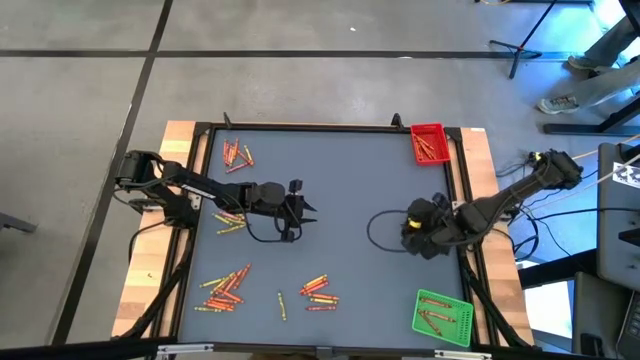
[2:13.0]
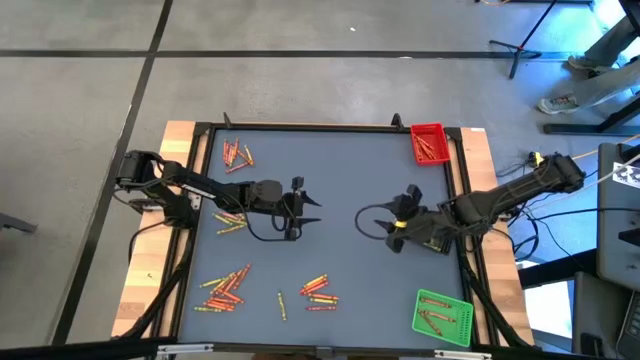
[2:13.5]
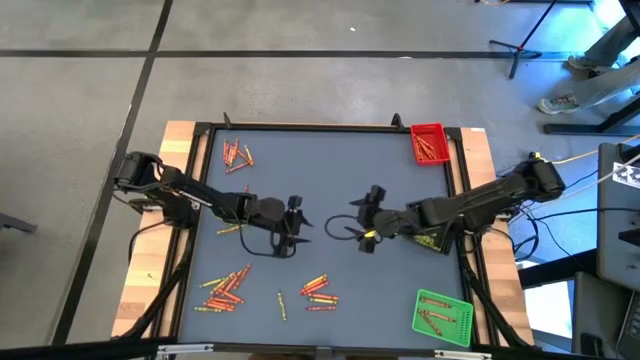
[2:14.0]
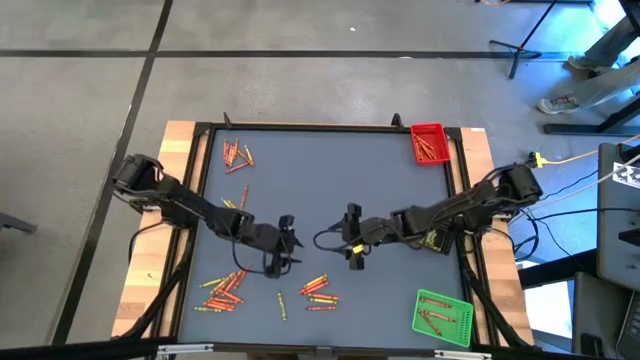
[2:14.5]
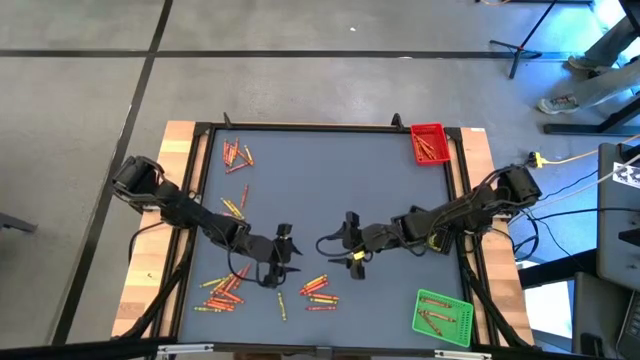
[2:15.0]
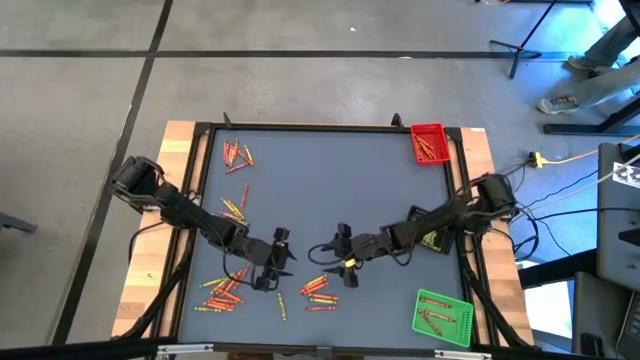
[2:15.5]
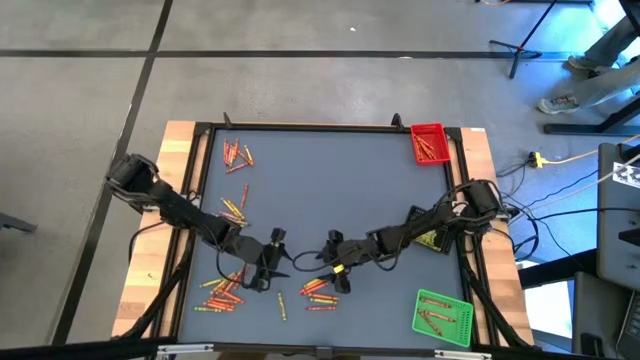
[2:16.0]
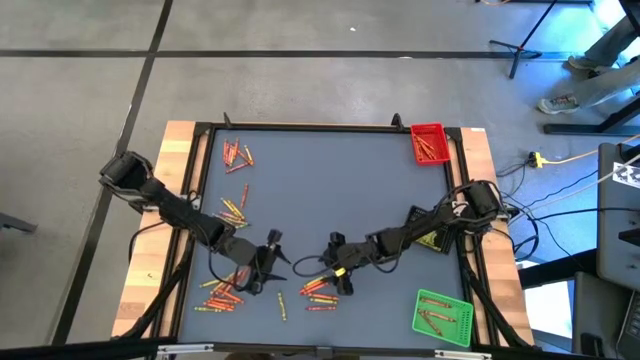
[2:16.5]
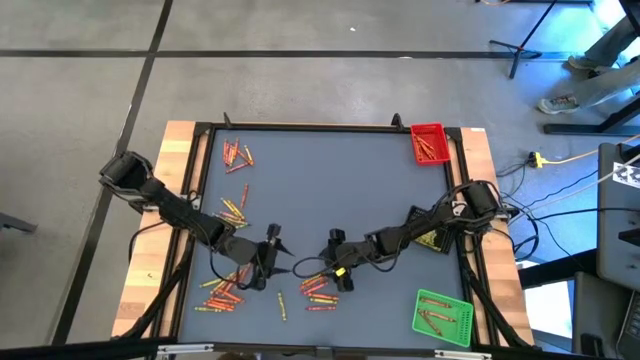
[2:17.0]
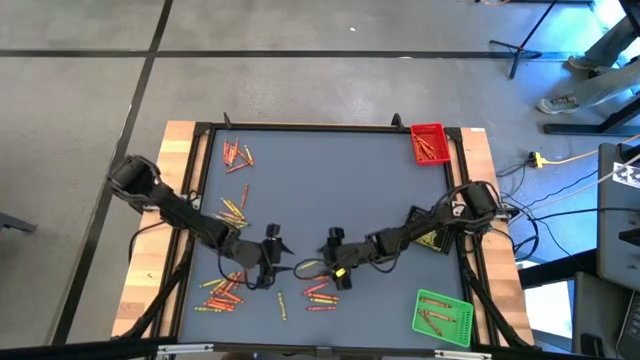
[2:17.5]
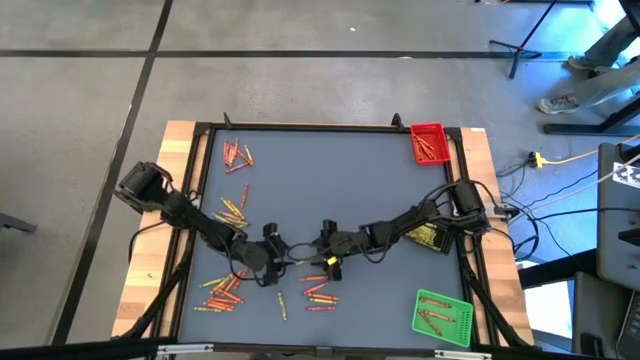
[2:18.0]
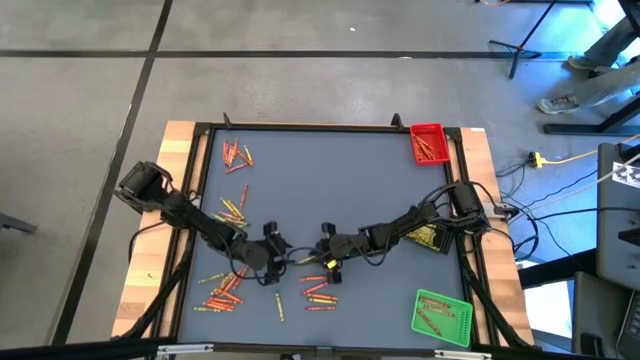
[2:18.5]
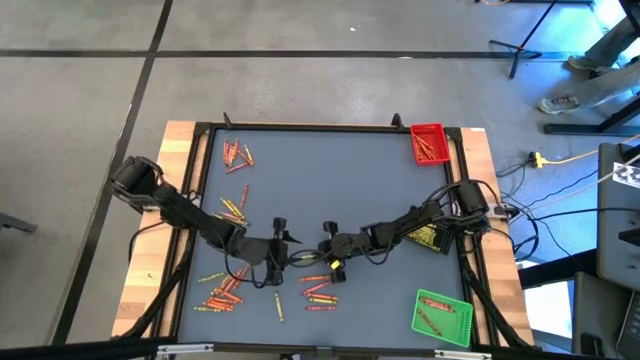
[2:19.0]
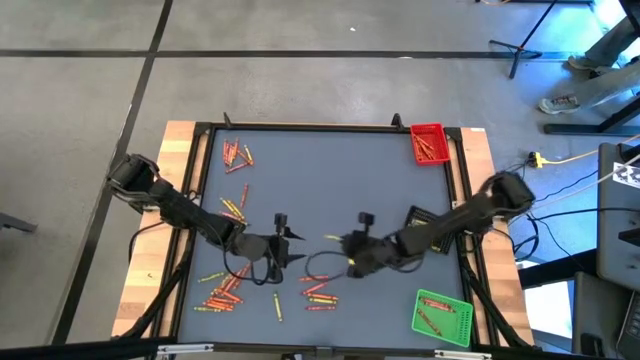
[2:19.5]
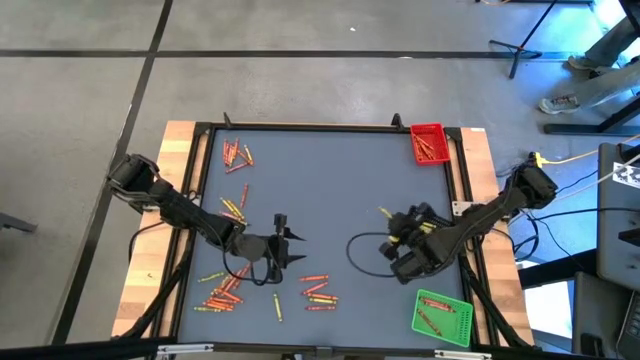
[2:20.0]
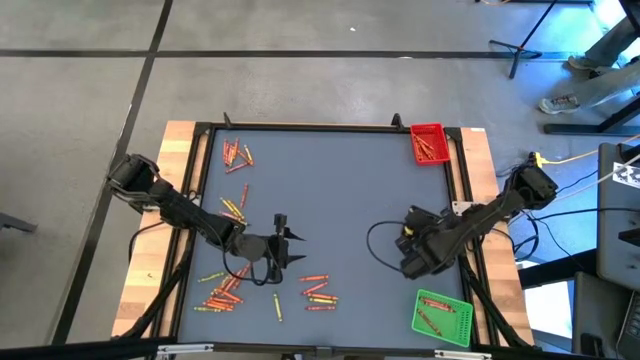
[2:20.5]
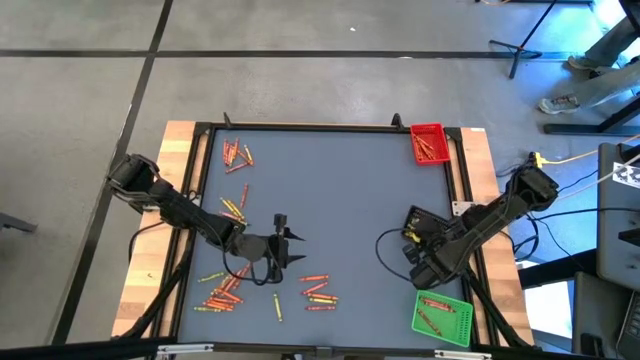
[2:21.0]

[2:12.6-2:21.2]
Task: Sort crayons
Put the green crayon into the black basket

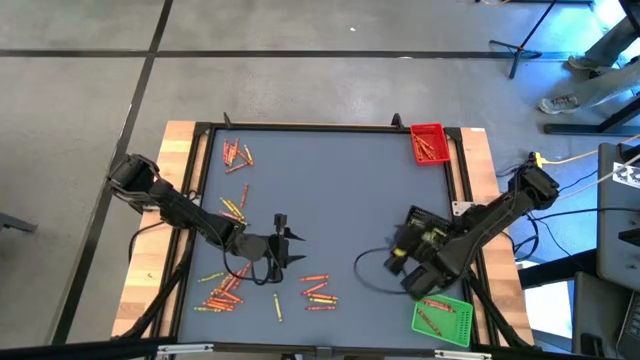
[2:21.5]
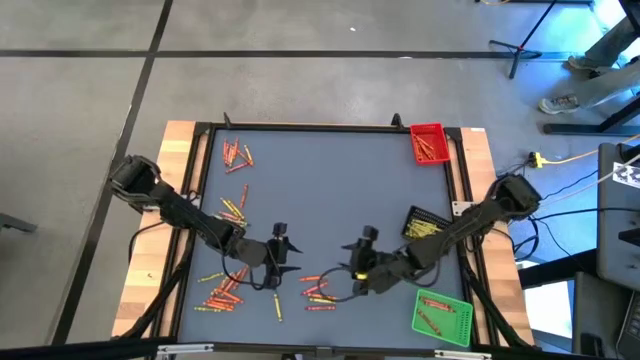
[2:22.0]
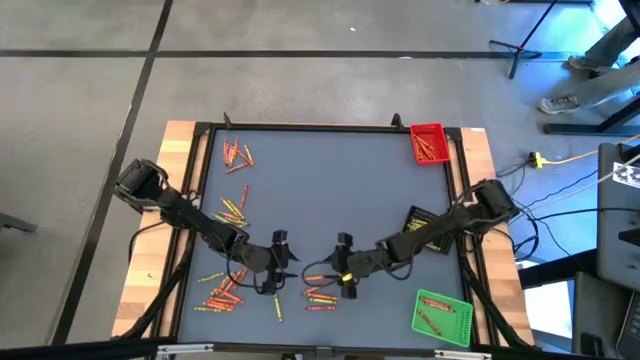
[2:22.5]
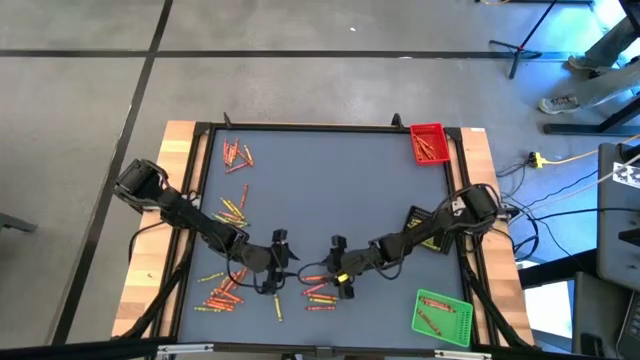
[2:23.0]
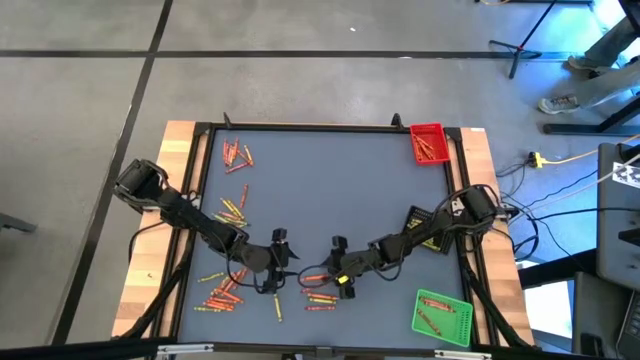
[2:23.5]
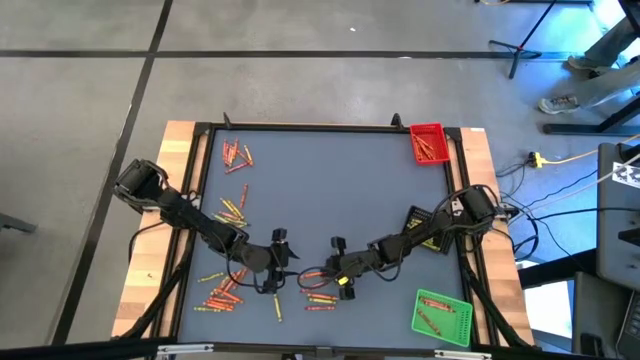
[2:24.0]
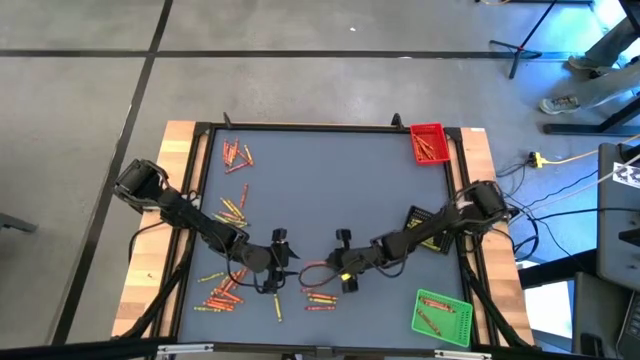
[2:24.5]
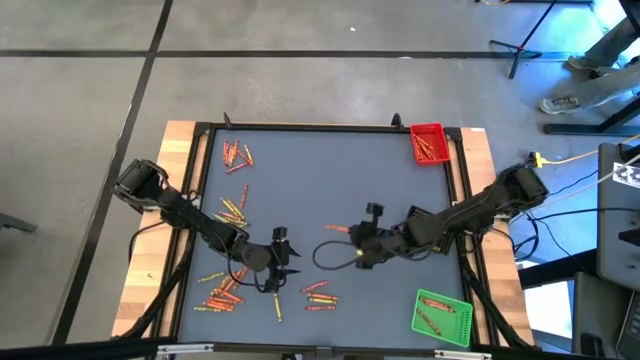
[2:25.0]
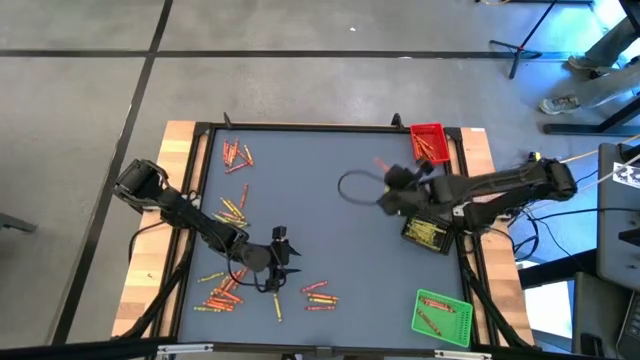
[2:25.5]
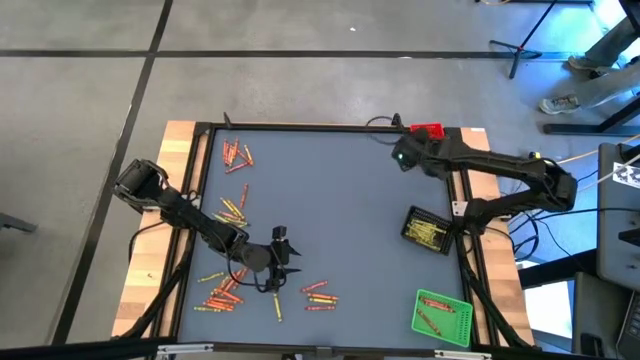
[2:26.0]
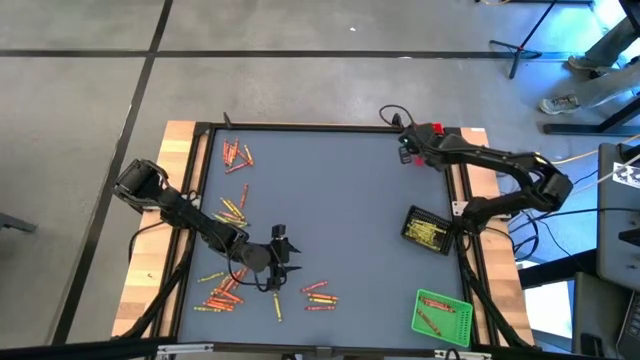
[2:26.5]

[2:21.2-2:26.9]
Put the orange crayon into the red basket

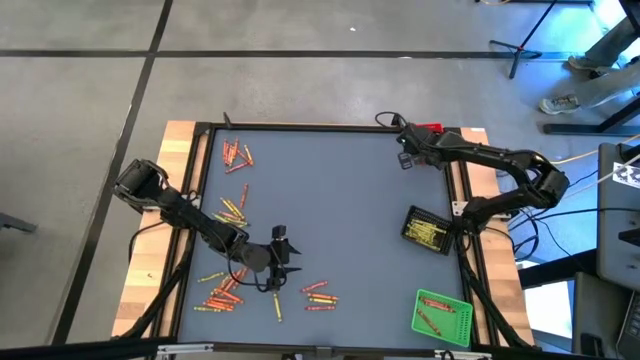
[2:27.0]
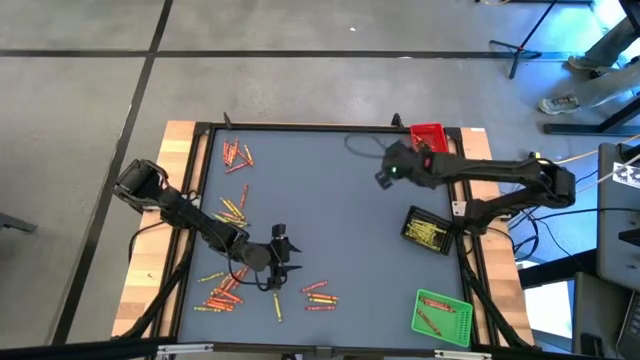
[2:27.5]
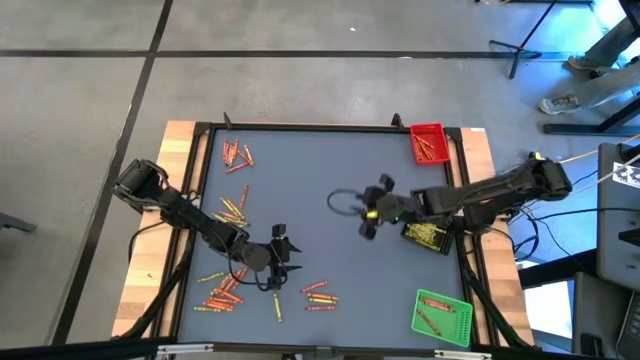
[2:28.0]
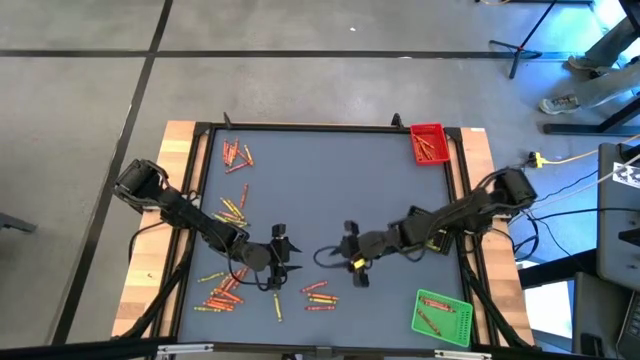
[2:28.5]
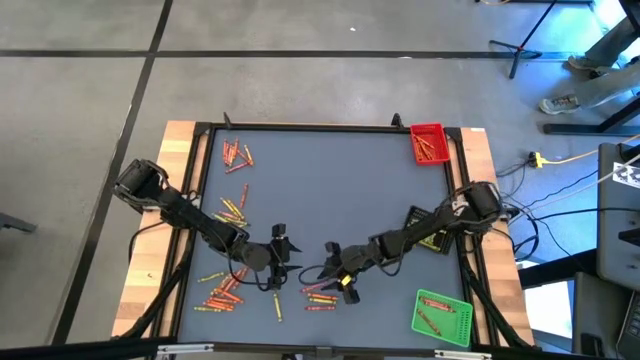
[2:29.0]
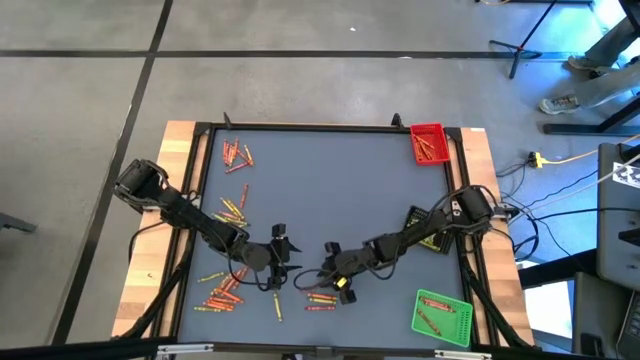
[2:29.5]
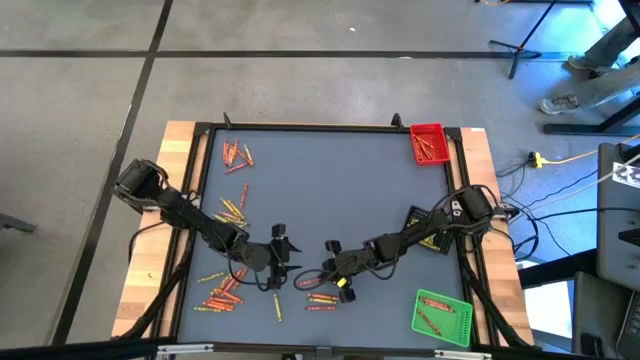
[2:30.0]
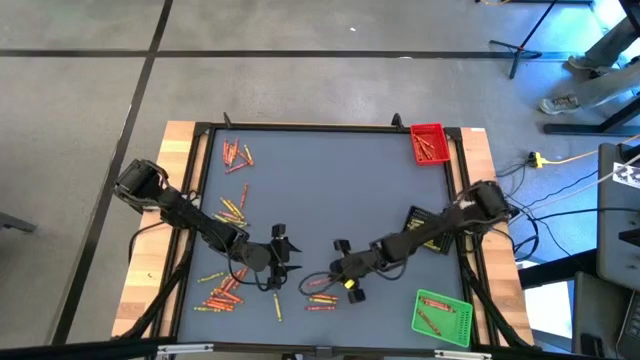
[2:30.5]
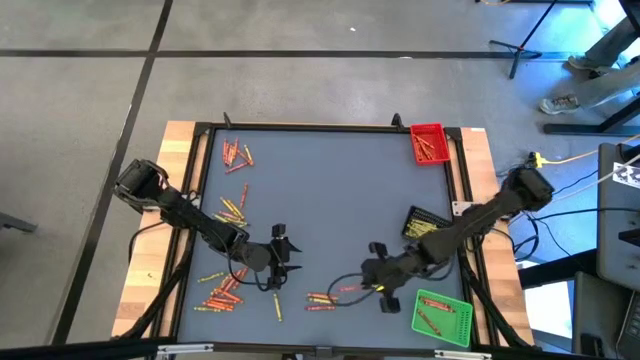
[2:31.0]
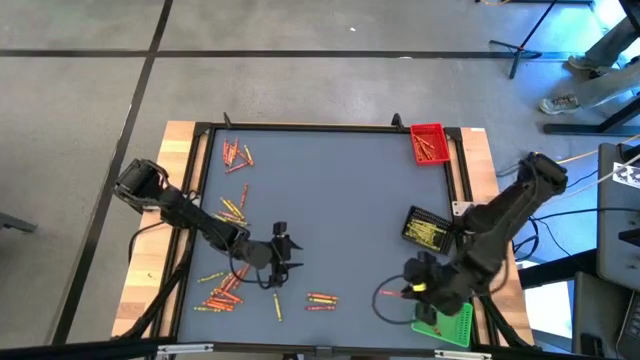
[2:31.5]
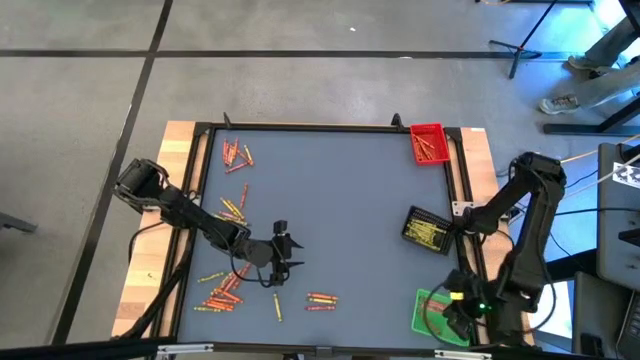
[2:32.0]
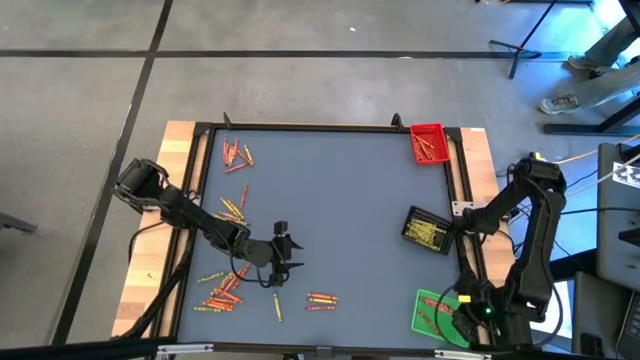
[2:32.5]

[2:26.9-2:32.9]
Put the red crayon into the green basket
